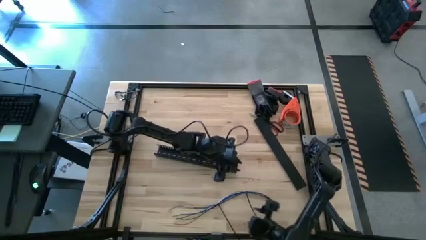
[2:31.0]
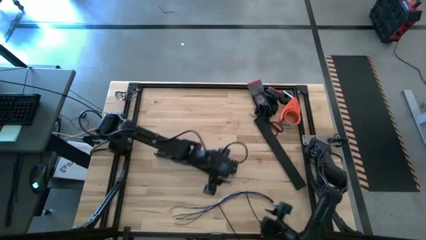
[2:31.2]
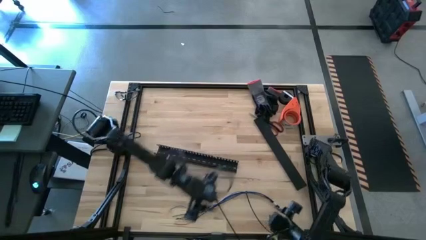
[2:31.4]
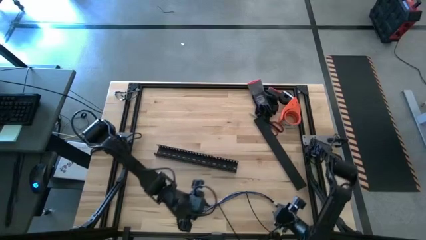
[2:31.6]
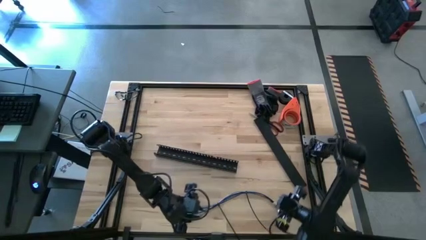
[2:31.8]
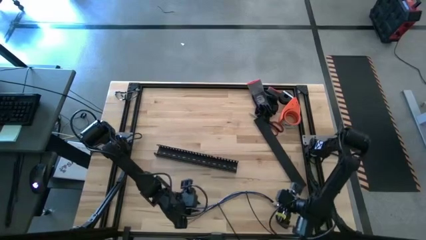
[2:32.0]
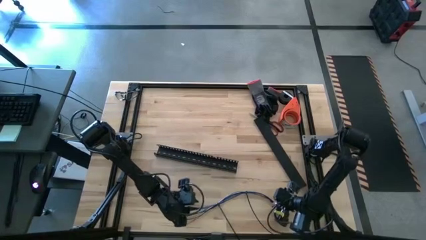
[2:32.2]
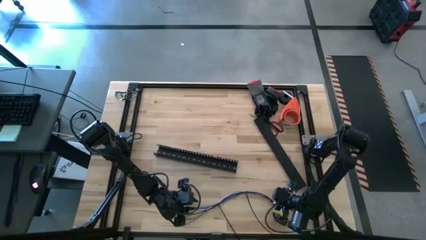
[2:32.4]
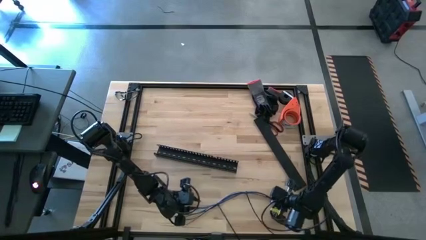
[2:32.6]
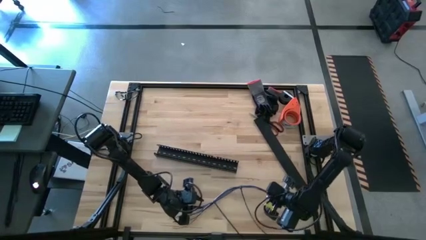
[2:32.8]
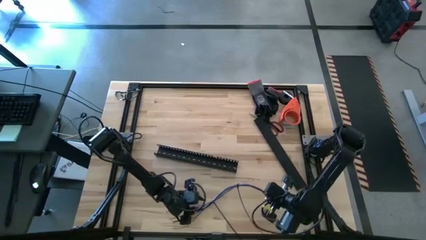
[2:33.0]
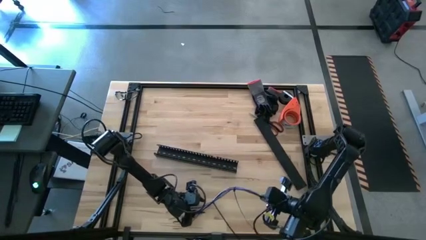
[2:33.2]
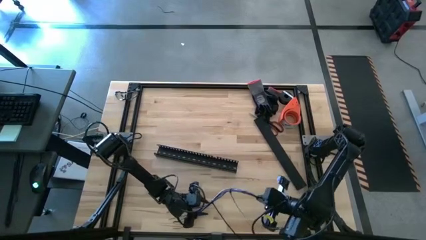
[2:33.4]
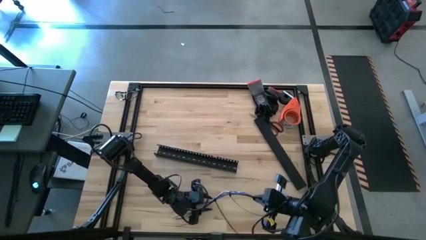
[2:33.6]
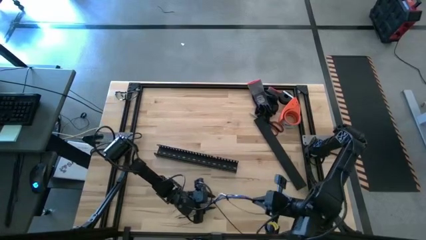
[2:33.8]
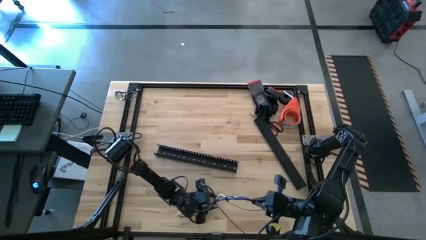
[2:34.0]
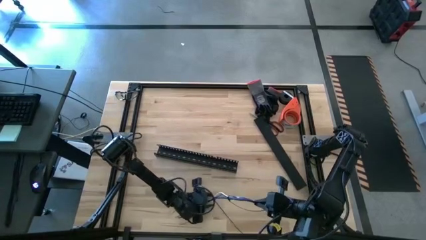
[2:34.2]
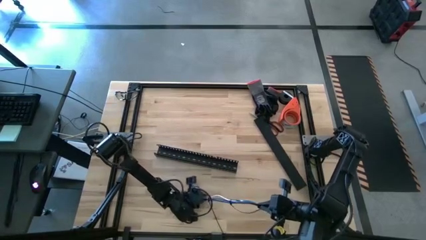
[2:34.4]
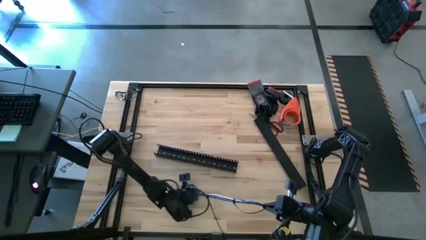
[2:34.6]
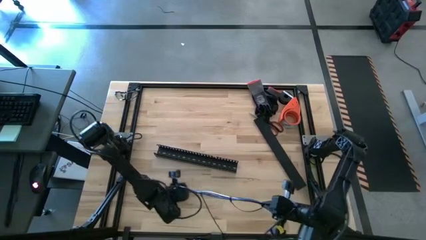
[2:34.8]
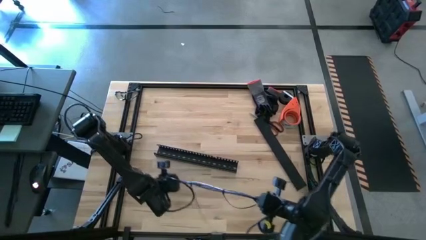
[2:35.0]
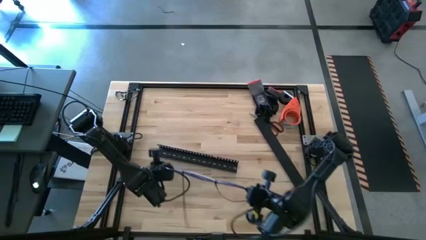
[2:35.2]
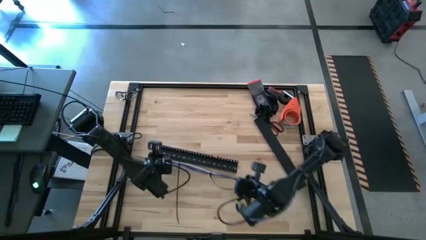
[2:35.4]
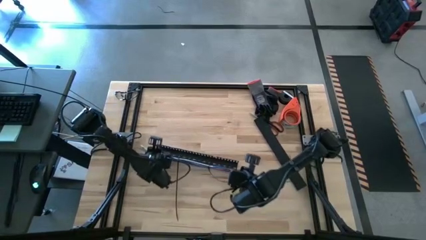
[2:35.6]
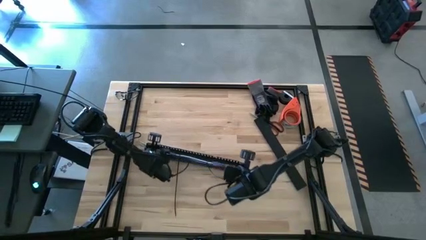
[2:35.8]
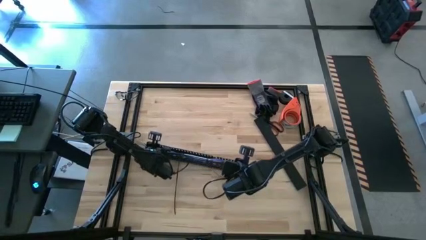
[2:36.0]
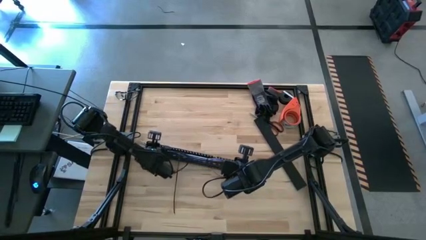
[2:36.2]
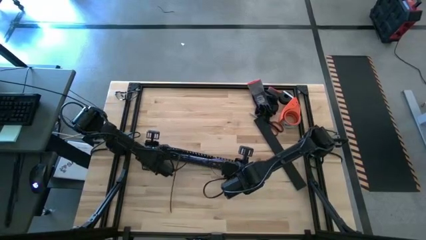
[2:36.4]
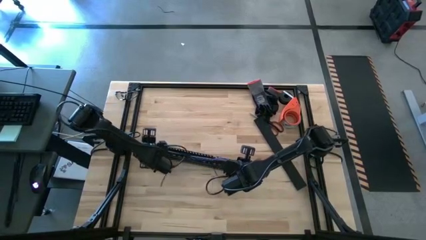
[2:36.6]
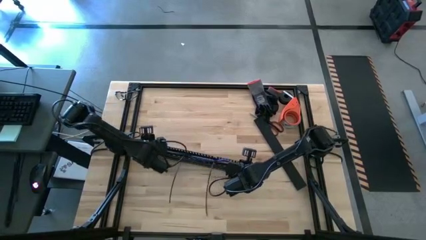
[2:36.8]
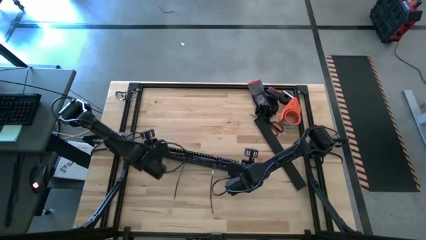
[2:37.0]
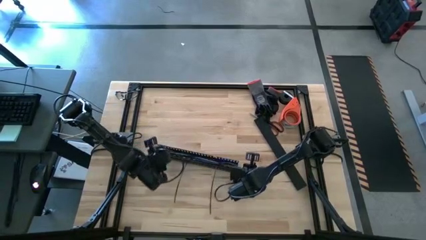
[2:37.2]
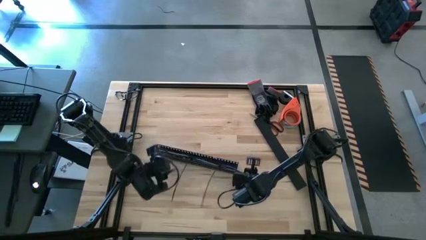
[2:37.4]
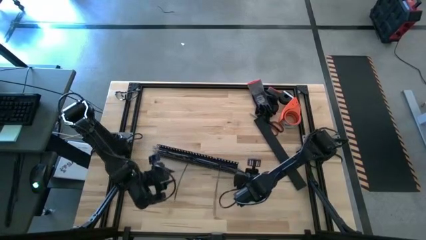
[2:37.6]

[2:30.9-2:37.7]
Task: Ziptie cables
Put the zip-tied colored cables into the black cable duct

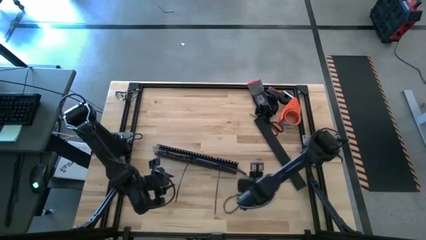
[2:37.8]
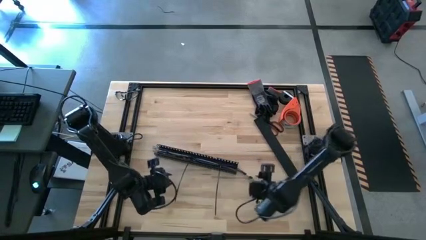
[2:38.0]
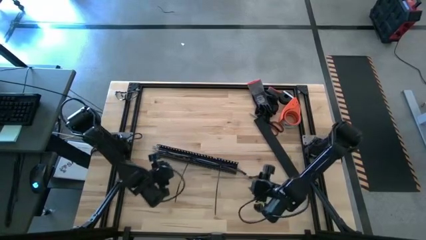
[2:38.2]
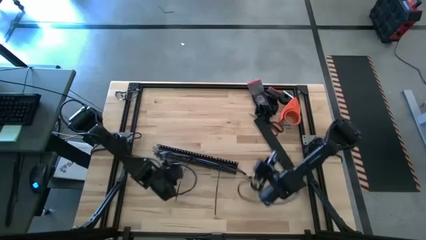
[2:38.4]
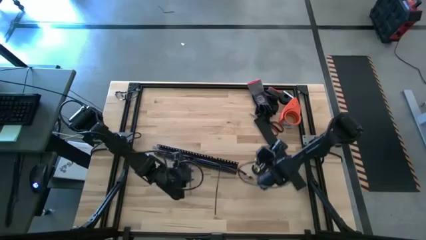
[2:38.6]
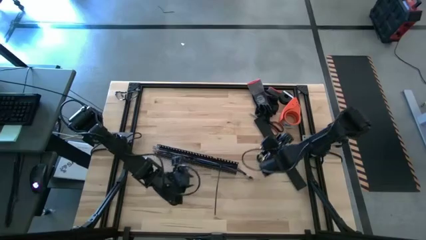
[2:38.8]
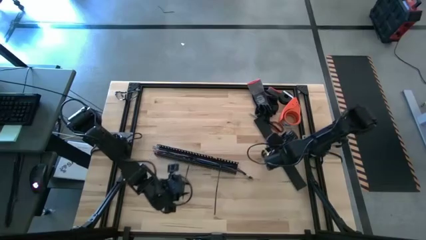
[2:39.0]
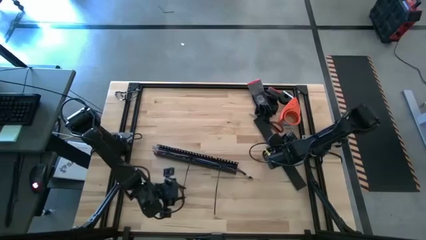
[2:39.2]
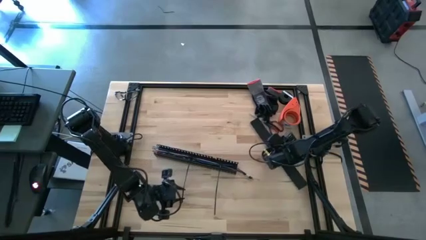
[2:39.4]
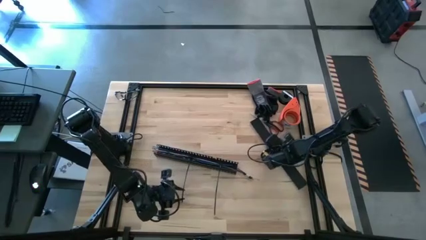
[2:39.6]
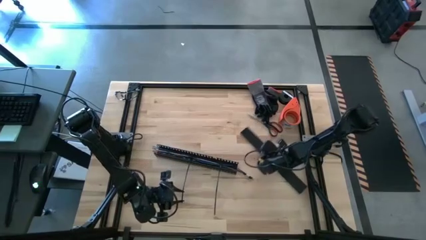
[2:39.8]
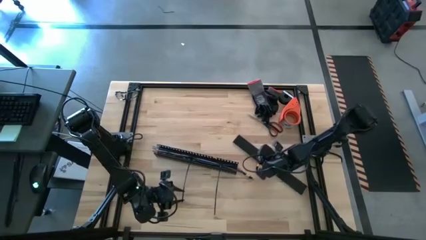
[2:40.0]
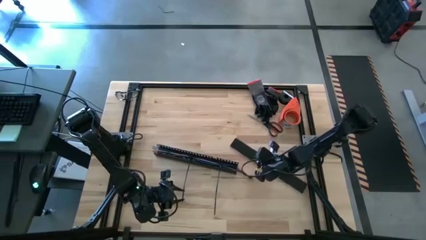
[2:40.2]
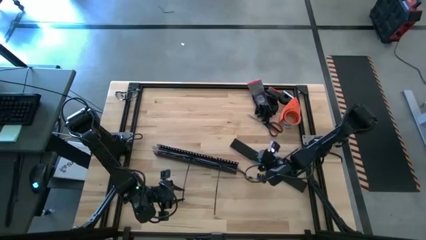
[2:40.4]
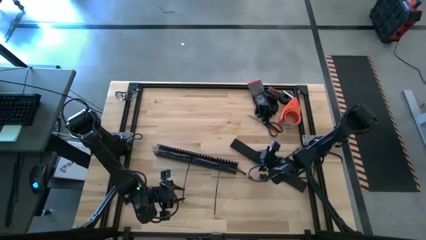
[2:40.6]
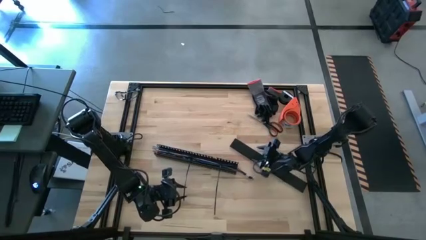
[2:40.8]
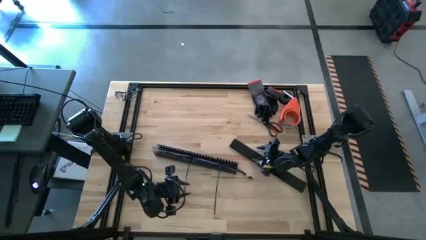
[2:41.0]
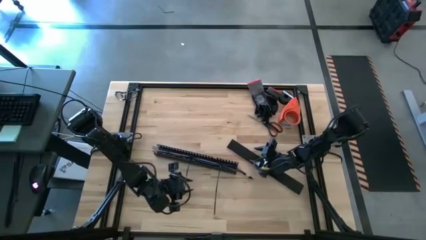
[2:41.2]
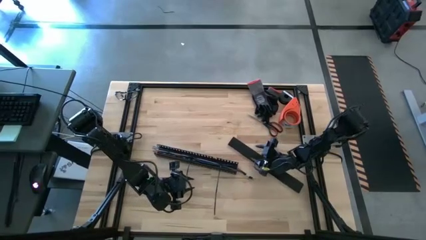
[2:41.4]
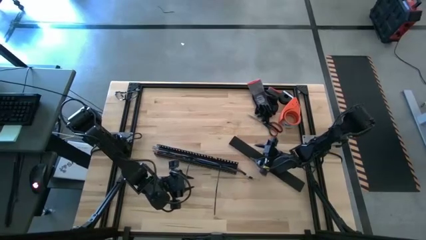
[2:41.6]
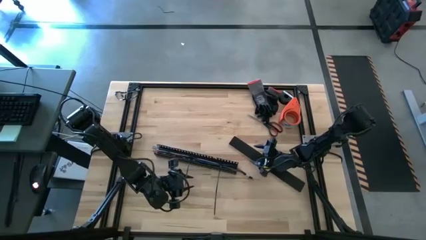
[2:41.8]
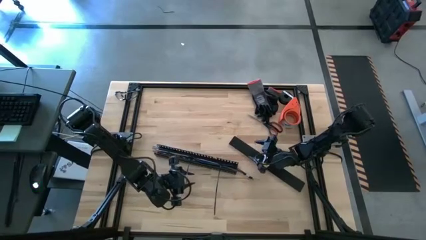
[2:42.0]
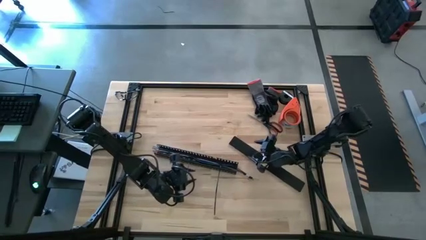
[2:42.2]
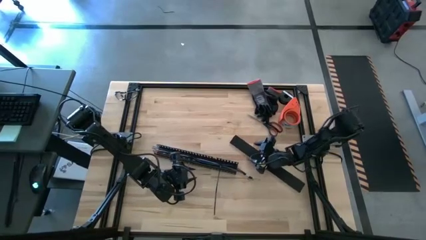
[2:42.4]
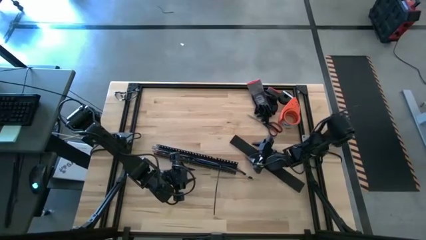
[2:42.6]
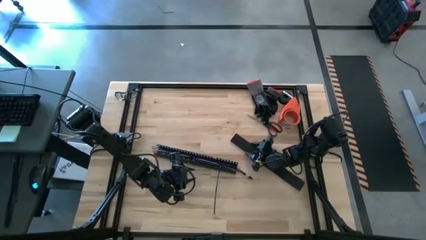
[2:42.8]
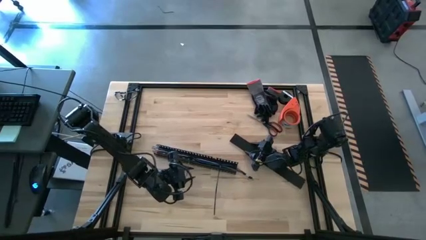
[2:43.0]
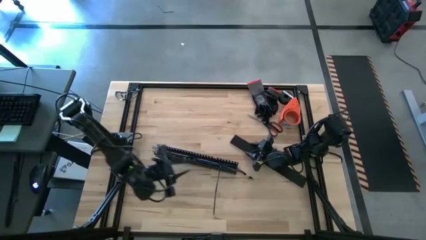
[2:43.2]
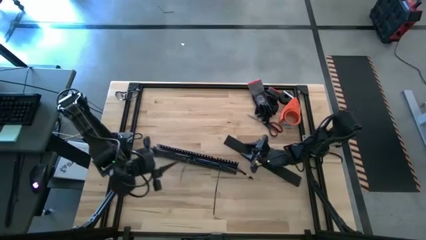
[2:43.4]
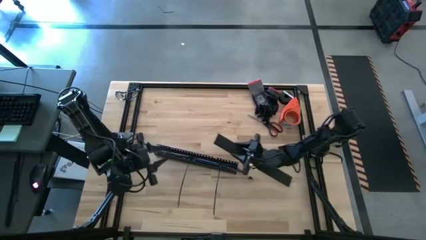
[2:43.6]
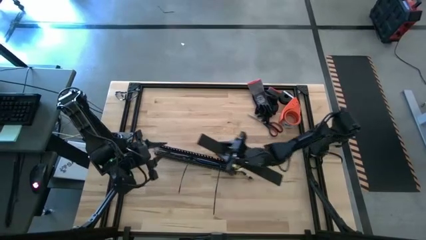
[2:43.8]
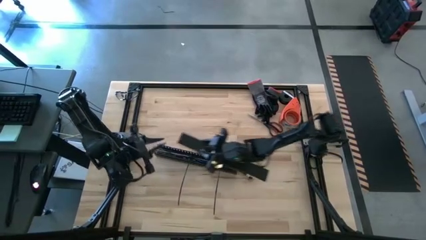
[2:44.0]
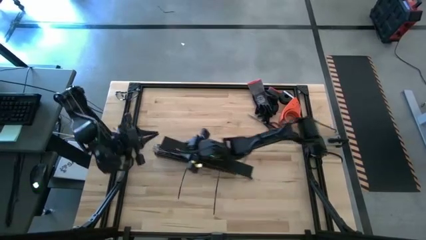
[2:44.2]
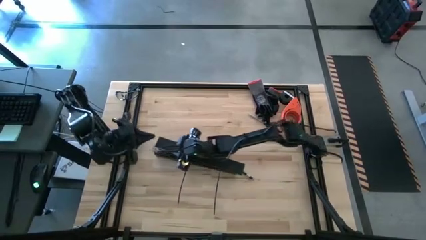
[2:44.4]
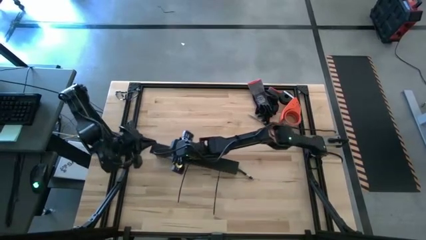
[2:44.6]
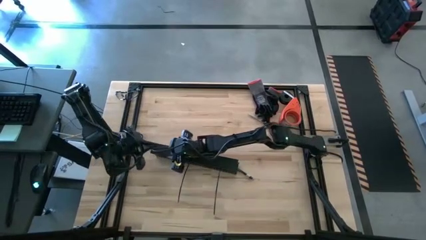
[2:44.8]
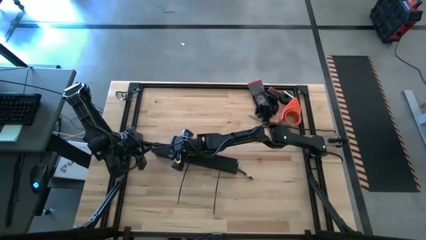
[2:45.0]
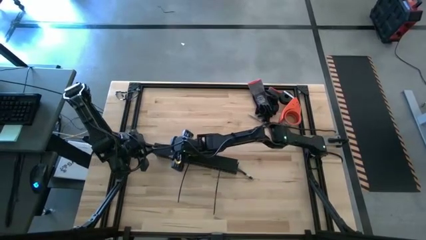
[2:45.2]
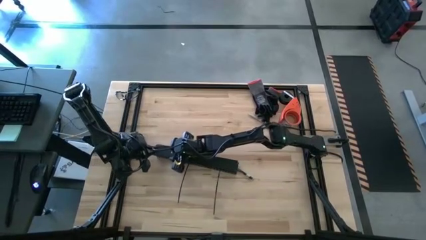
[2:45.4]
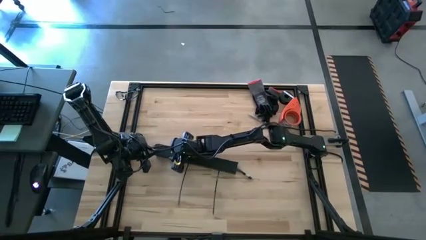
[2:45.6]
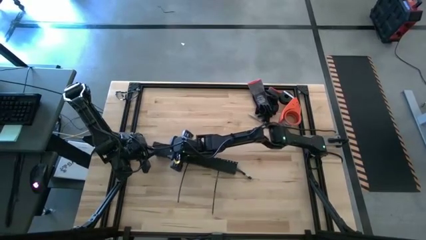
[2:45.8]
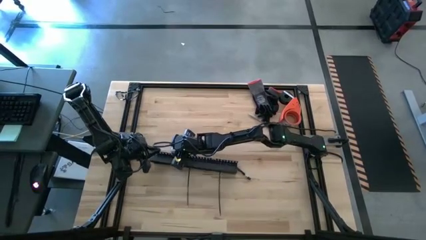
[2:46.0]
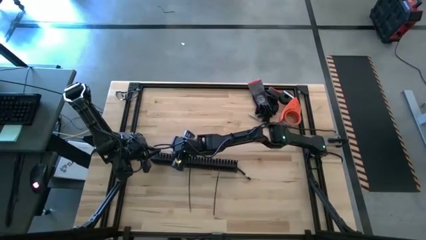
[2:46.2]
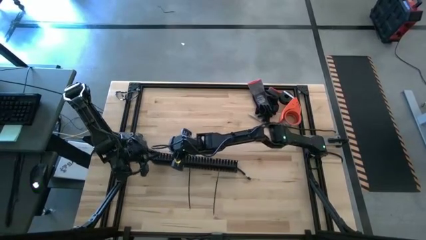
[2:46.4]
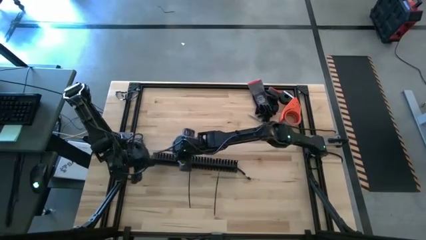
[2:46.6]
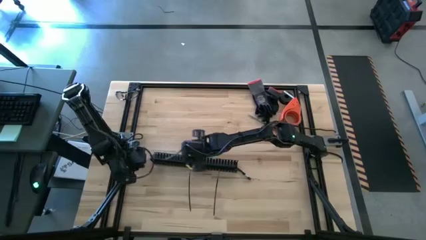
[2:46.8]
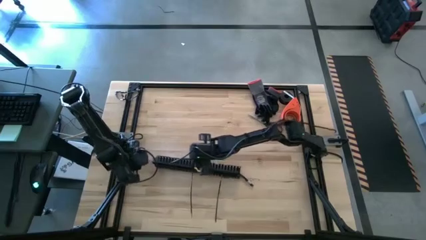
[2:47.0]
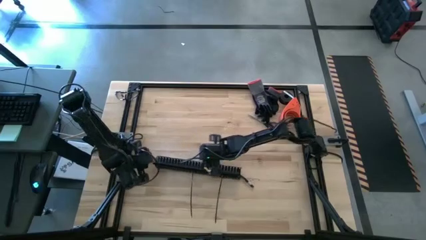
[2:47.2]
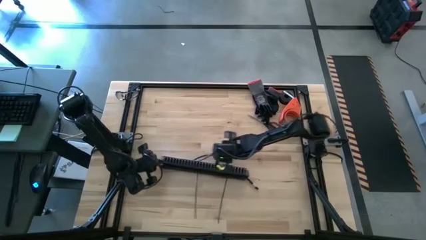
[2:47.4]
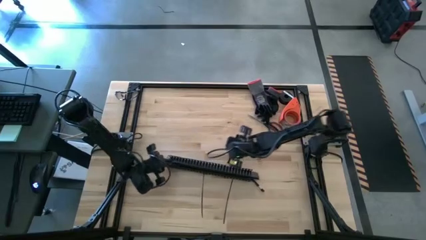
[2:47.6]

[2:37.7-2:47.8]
Close the black cable duct cover
